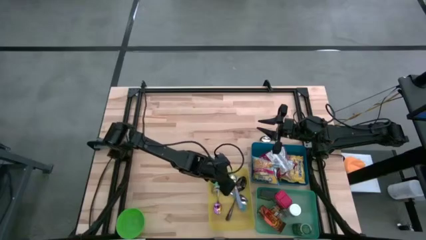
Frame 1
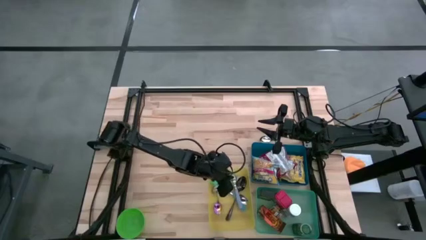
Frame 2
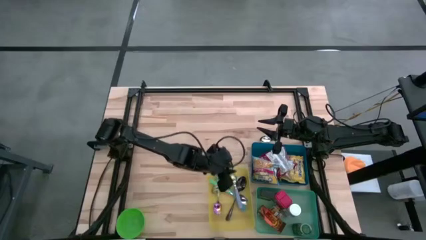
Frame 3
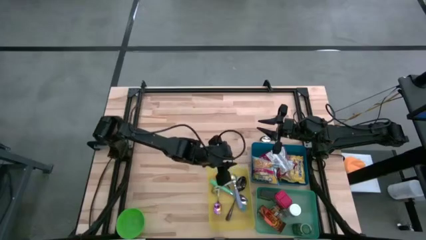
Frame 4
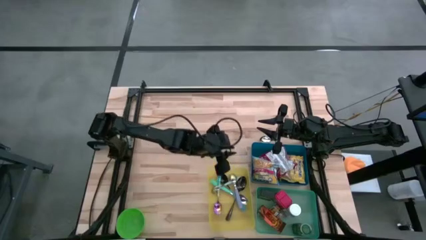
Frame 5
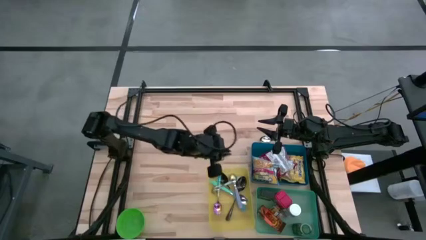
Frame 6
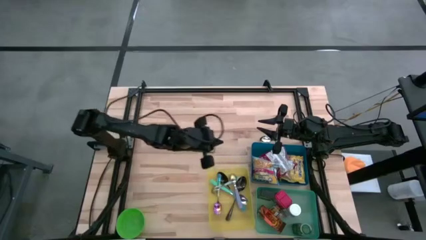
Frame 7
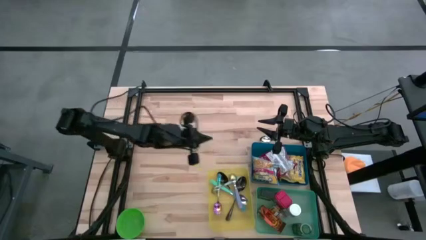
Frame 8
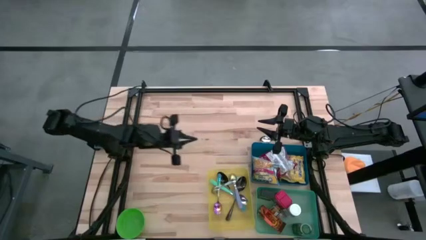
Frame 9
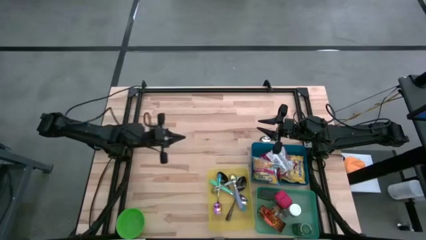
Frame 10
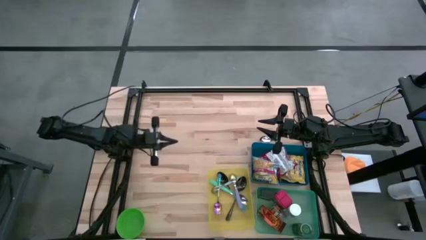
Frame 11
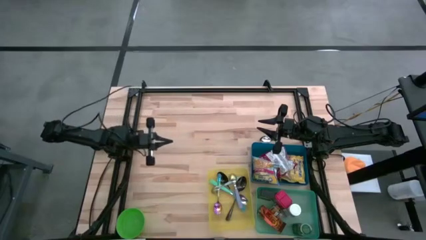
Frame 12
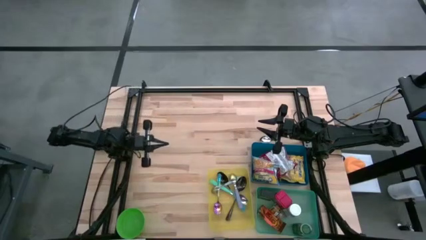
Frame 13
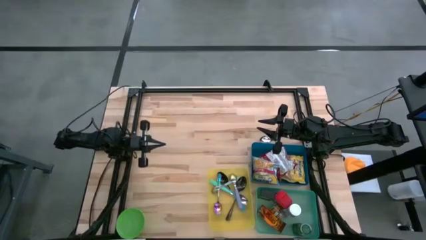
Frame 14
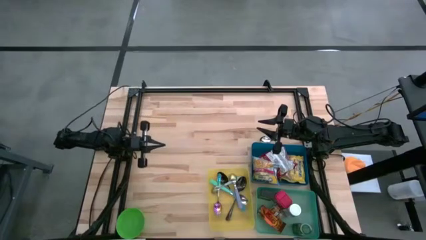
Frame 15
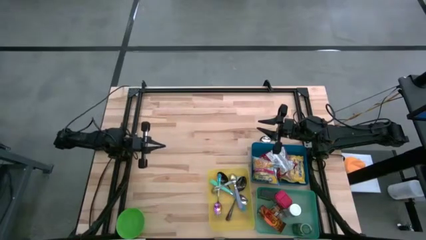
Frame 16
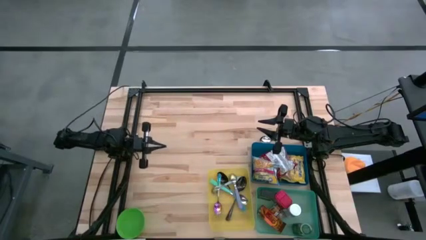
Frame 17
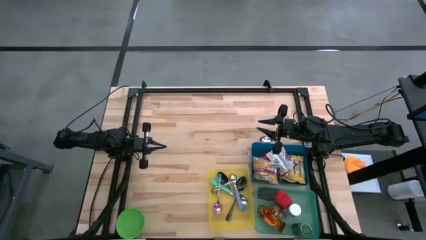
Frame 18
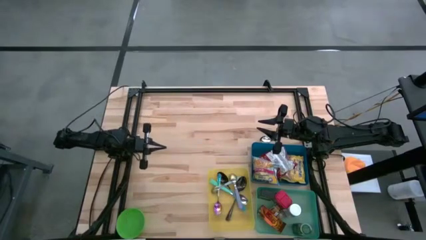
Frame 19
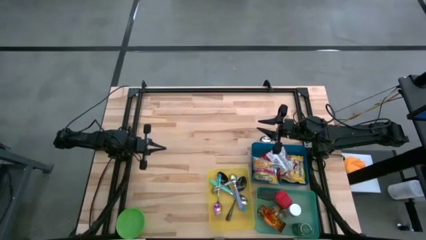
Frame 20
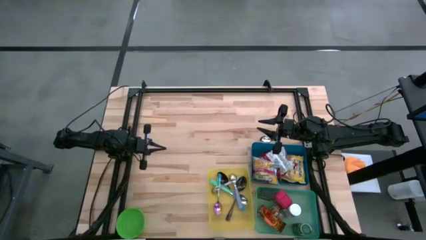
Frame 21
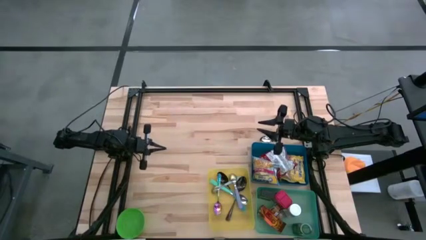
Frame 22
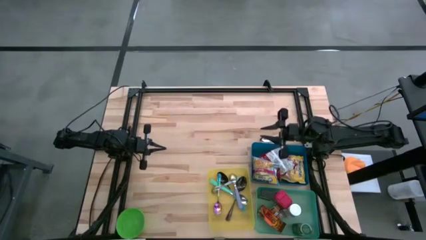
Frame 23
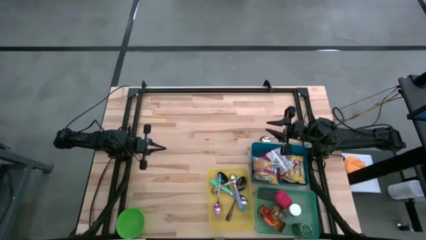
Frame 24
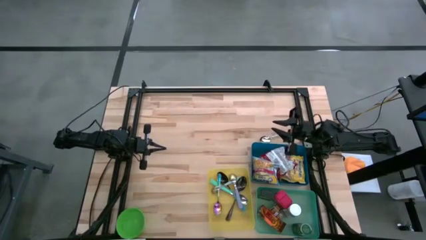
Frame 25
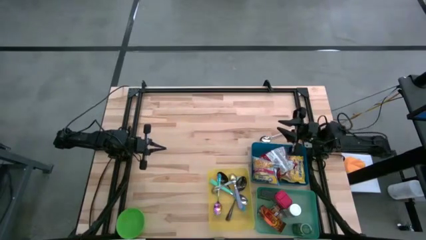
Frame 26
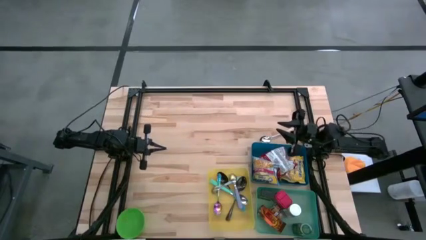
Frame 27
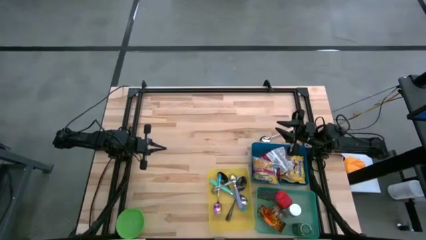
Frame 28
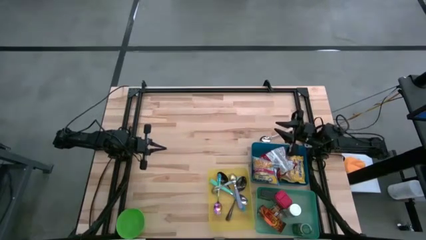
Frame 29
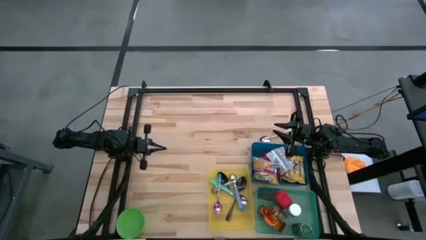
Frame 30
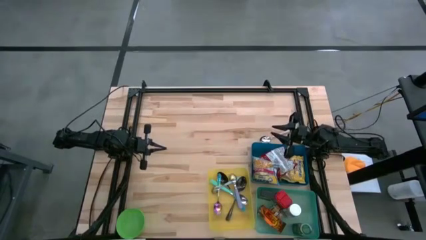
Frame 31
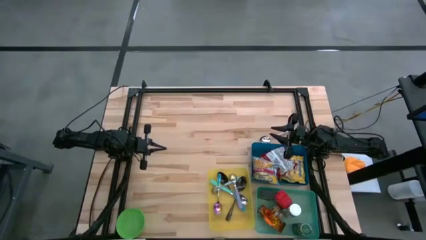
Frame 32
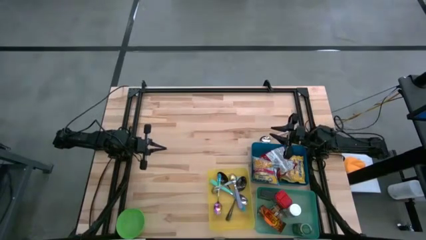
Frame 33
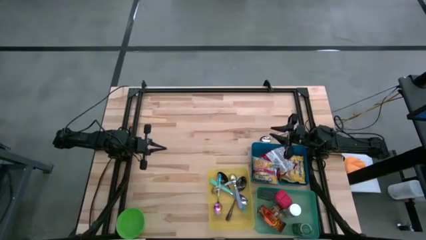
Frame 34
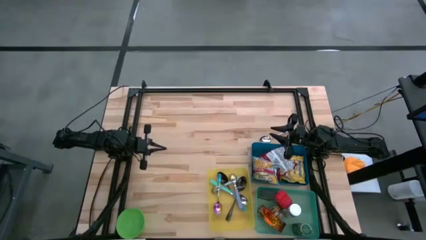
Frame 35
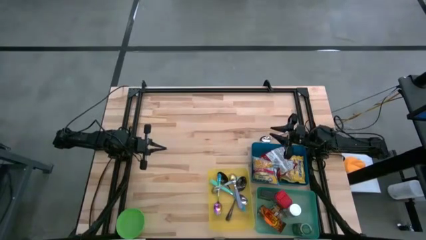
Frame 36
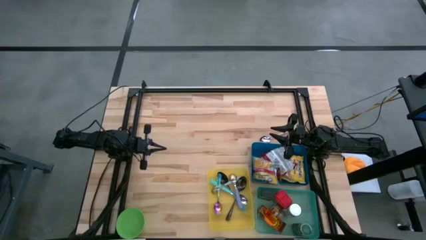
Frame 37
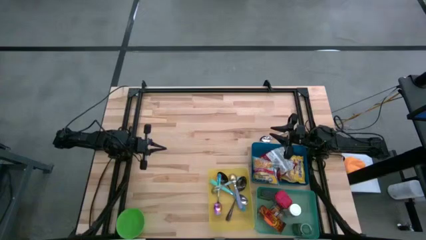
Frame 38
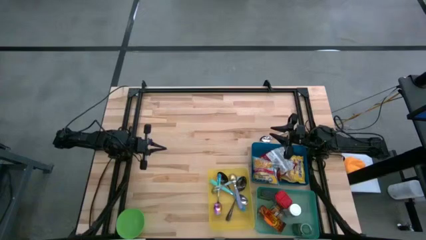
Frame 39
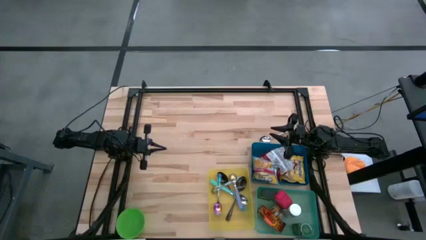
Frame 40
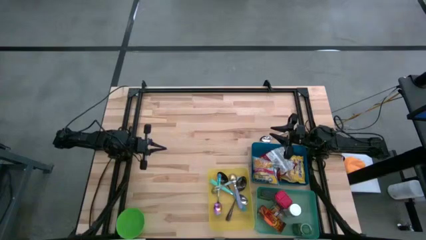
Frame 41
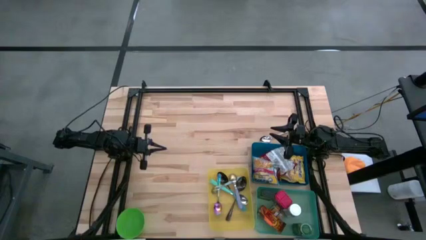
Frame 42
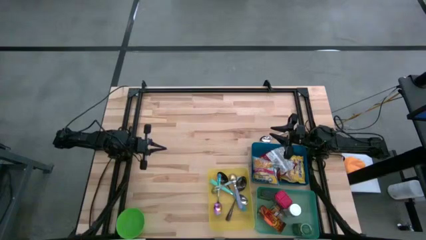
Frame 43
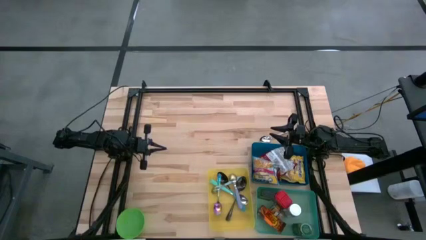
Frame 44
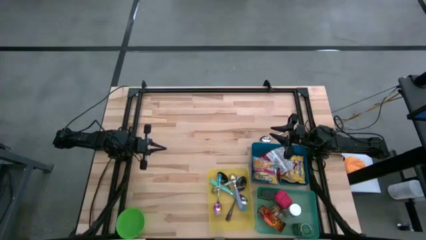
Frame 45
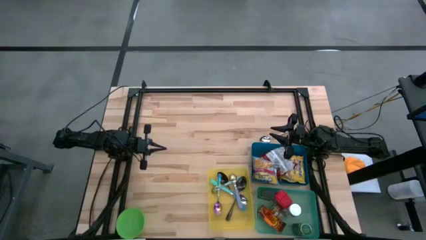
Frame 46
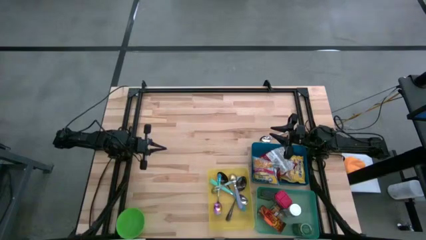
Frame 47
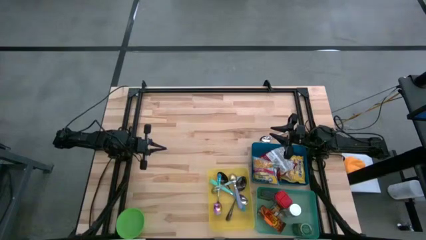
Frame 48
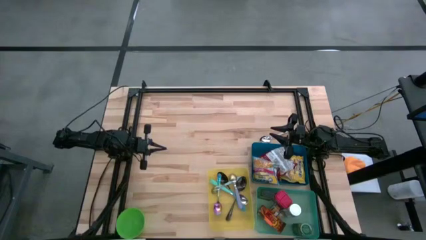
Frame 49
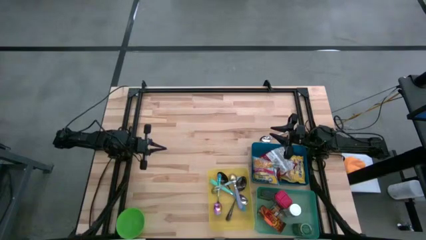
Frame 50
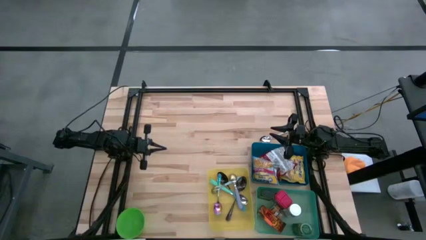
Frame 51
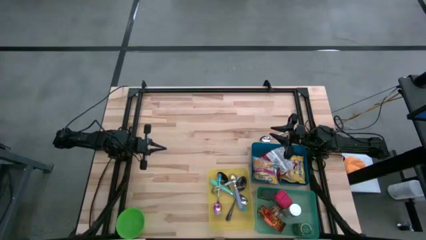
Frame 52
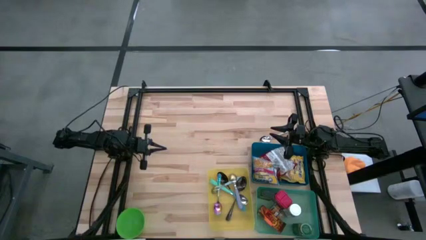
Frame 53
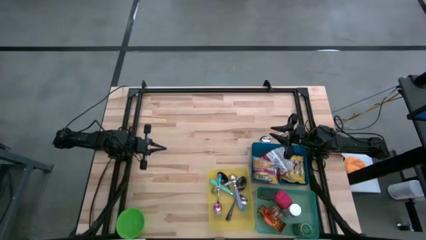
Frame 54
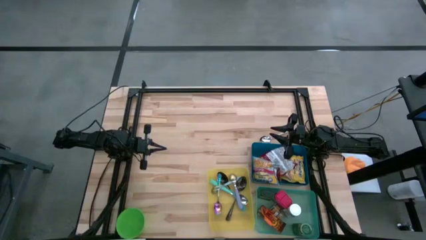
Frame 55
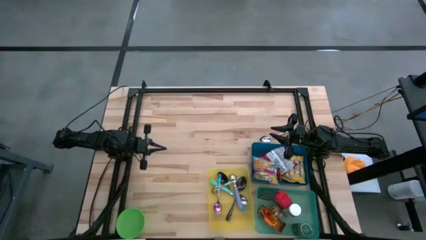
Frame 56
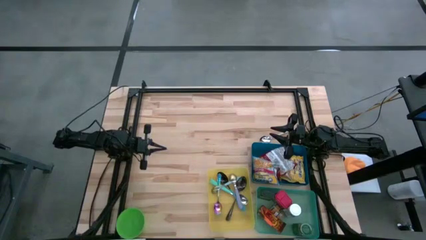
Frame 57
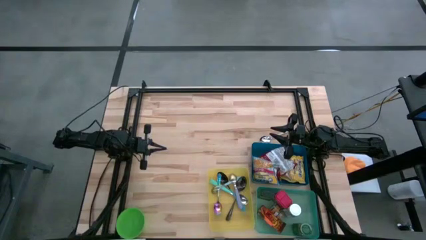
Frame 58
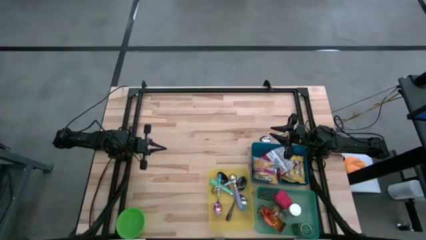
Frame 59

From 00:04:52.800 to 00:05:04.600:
Return to Home Position
